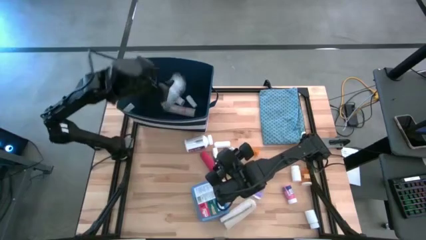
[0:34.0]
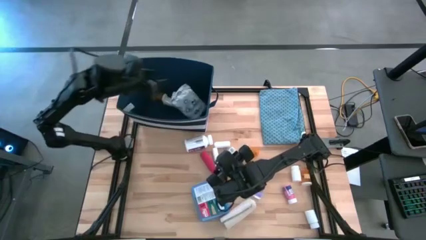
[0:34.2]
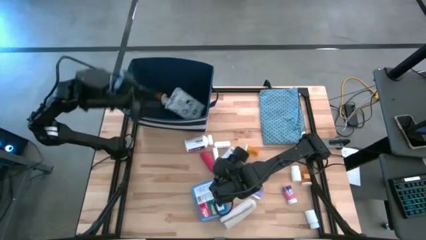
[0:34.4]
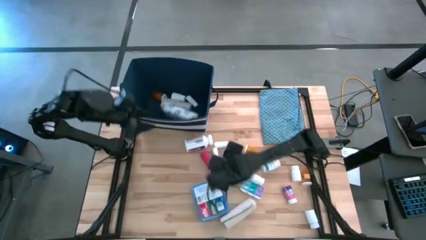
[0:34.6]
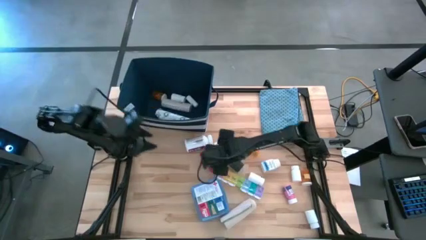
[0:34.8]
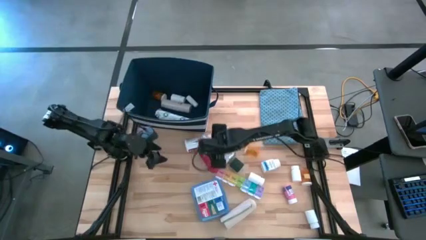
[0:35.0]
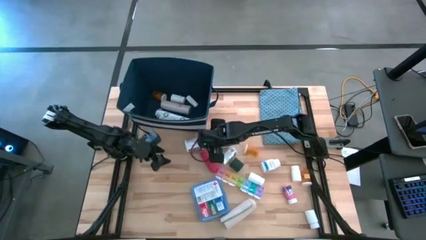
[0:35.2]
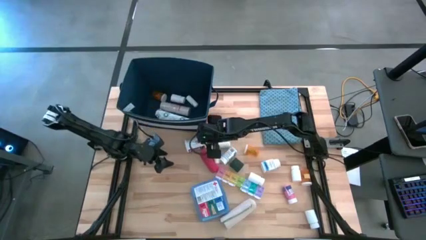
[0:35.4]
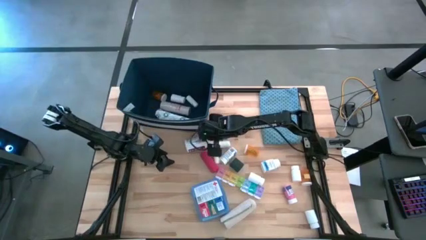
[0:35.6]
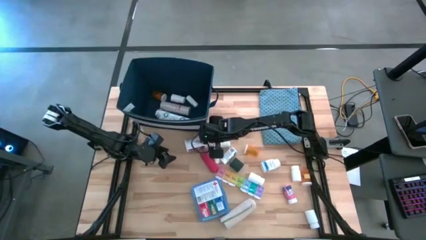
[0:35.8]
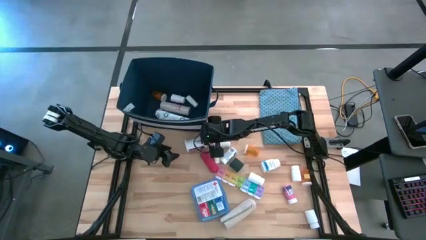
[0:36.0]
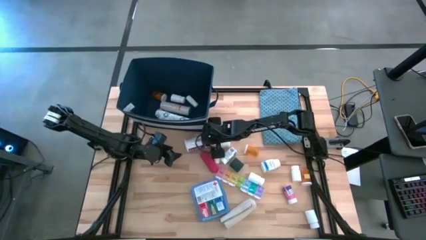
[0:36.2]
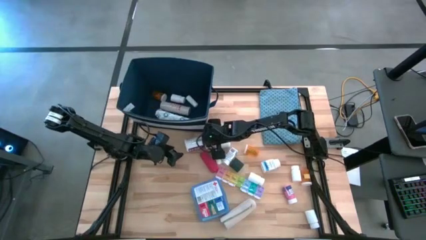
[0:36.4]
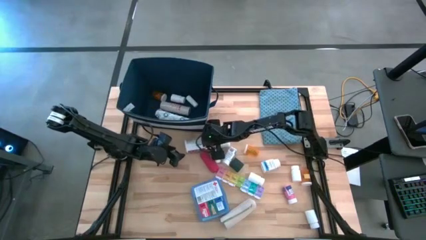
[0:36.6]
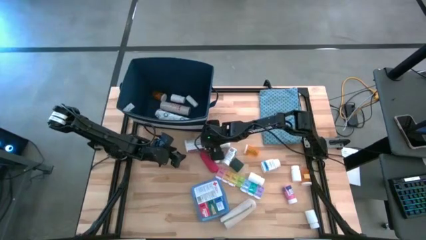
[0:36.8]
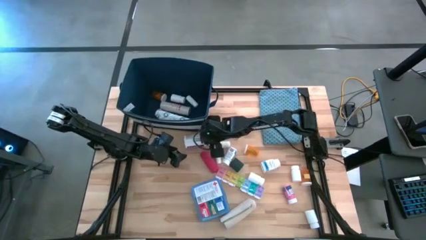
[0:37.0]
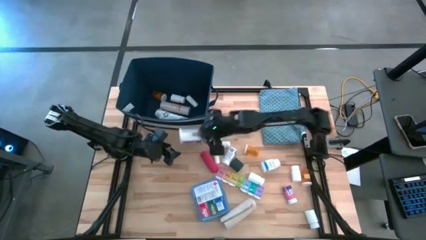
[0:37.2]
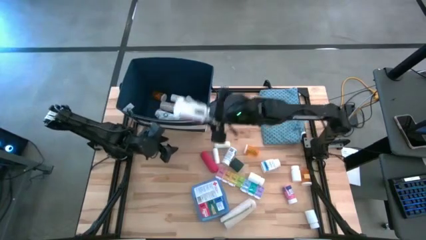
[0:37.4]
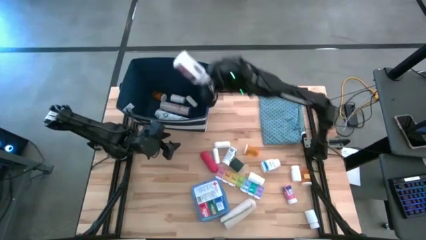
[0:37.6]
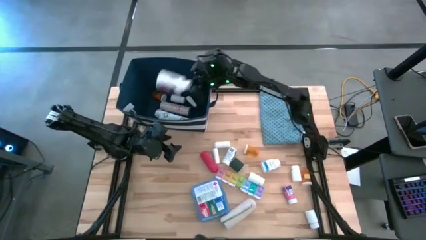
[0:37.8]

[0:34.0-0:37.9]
Task: Pick & place medical supplies in basket/bin
Put the violet medicine bottle into the blue bin

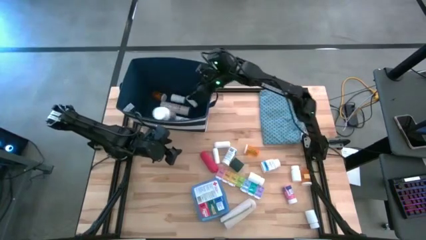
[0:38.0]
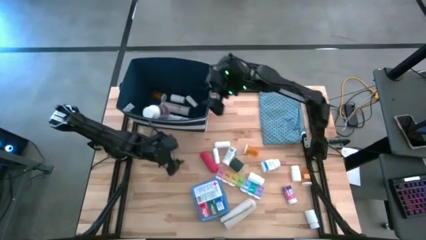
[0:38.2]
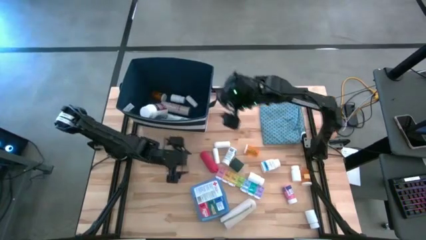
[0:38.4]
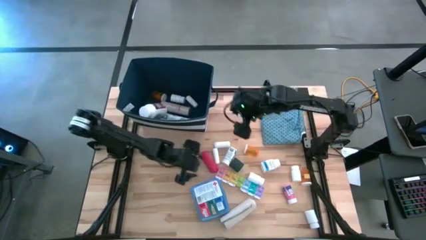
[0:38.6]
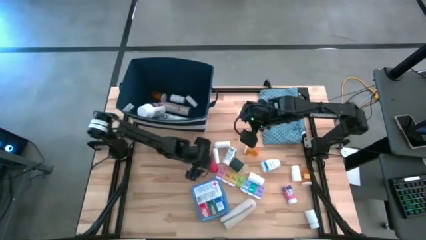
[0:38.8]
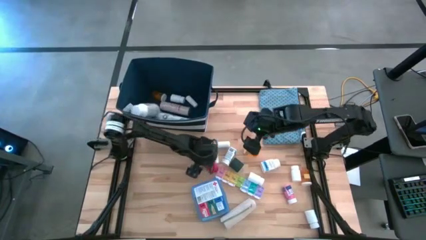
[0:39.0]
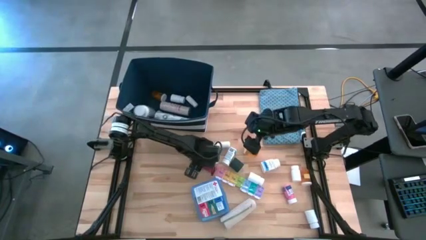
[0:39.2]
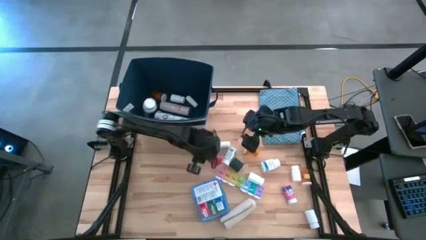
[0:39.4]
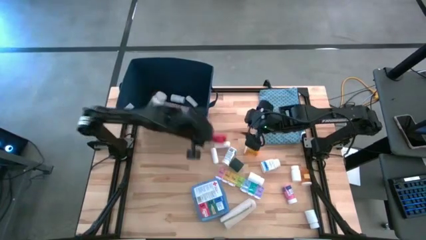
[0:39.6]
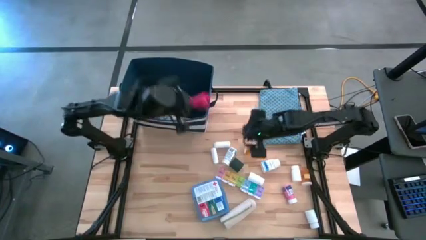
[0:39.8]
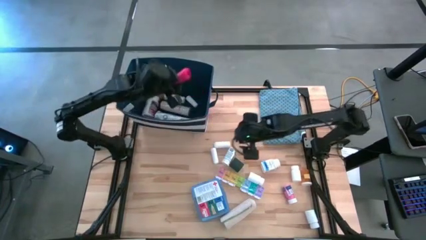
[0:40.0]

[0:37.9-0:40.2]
Put the red bandage into the blue bin

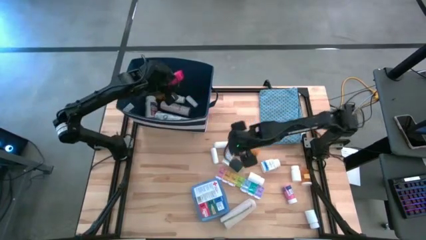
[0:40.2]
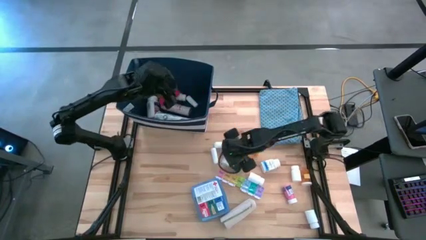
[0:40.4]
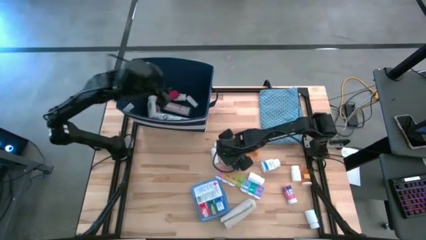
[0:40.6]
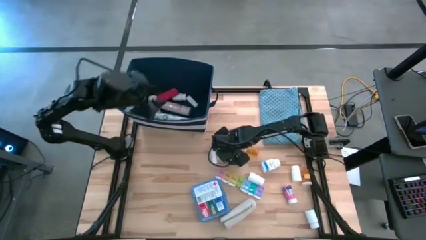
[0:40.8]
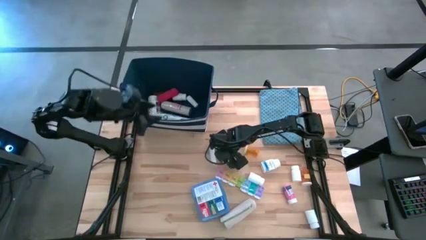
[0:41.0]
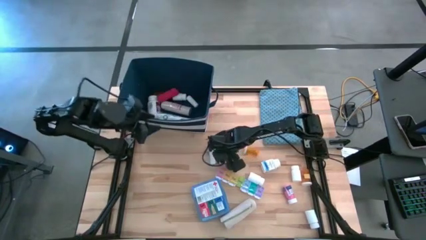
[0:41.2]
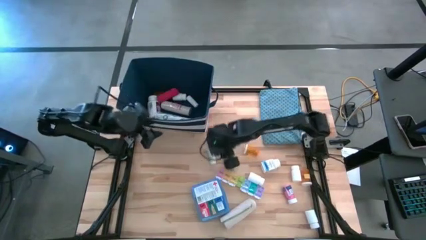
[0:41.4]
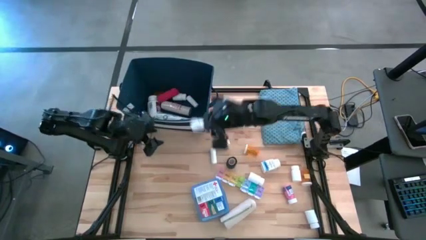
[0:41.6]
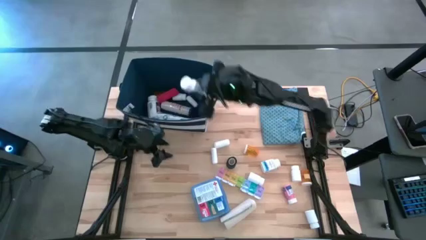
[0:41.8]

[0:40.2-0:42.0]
Put the left blue supplement bottle into the blue bin

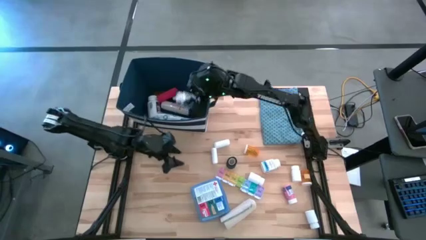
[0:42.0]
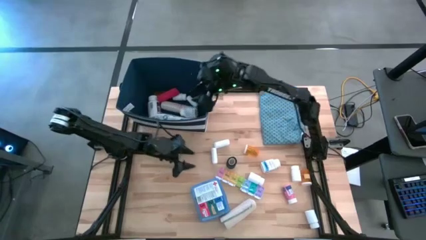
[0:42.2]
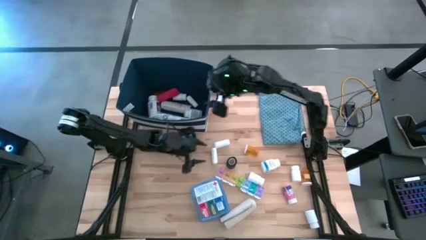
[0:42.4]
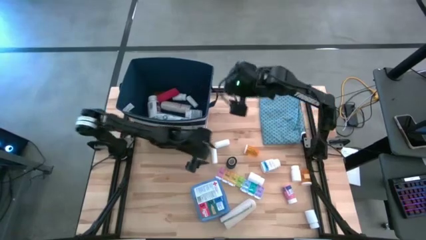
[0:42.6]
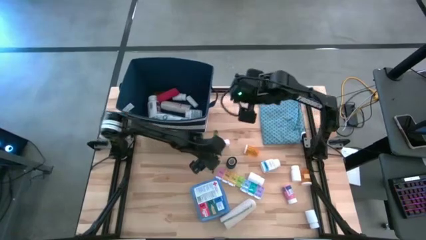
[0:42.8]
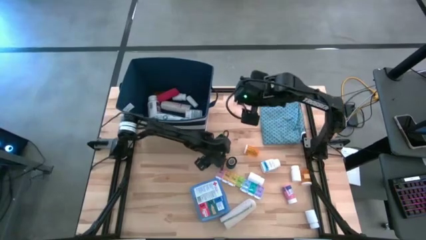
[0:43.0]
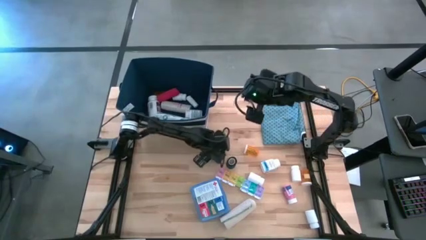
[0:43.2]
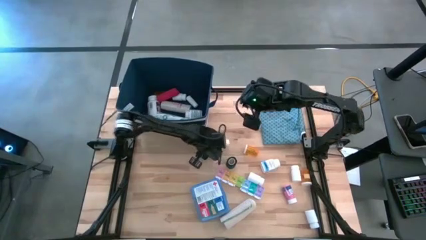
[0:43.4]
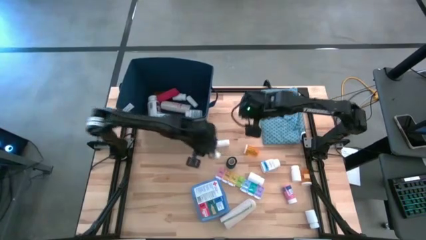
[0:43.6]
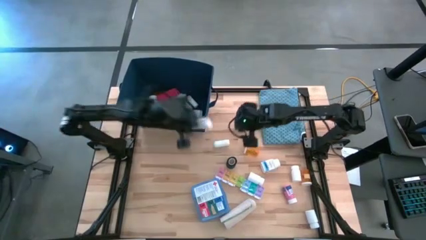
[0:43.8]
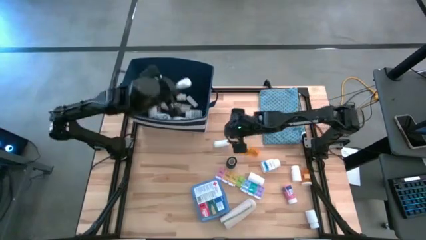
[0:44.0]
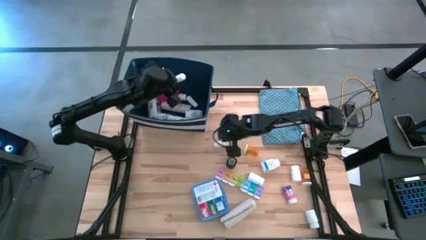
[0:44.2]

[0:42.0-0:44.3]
Put the bottom rolled gauze into the blue bin

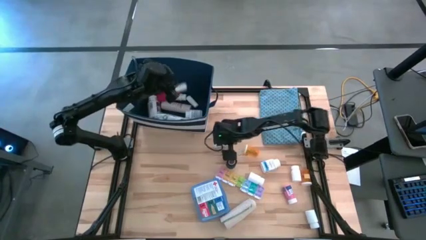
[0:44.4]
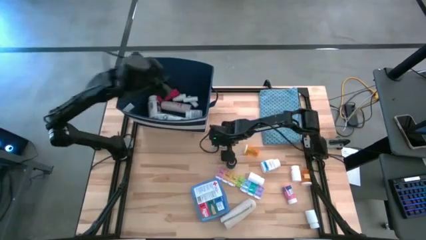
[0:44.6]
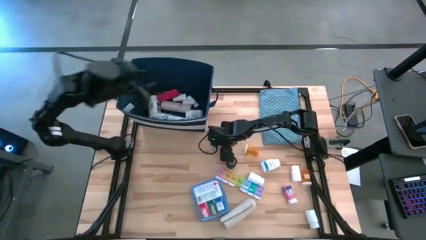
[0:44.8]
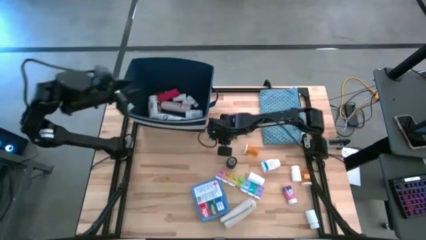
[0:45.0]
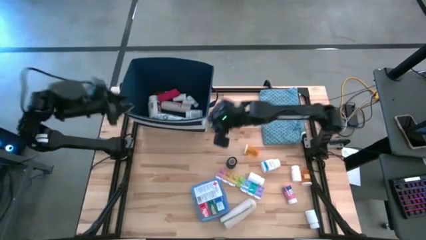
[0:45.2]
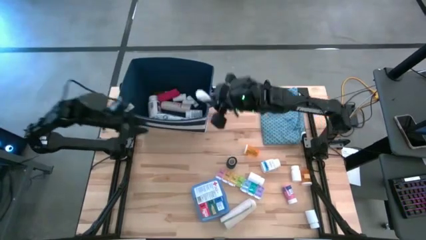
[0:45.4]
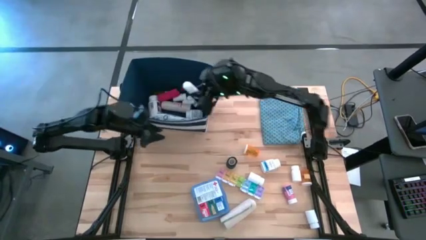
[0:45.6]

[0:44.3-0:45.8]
Put the rolled gauze into the blue bin

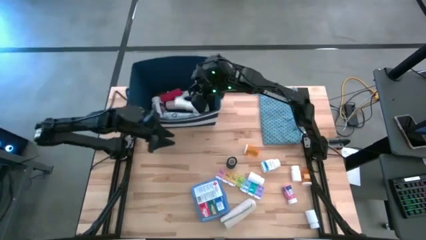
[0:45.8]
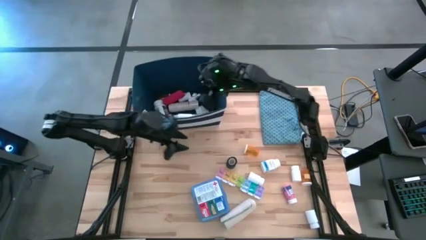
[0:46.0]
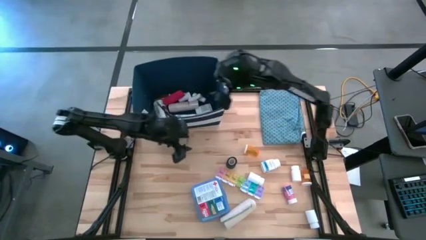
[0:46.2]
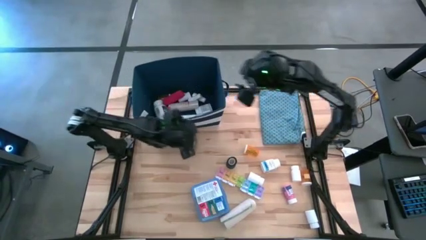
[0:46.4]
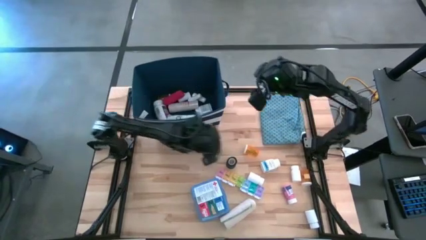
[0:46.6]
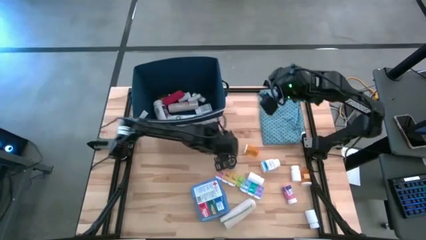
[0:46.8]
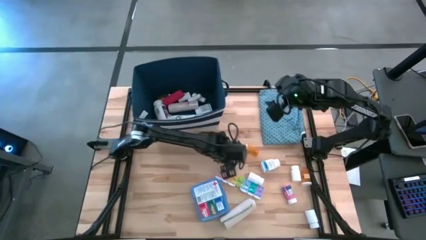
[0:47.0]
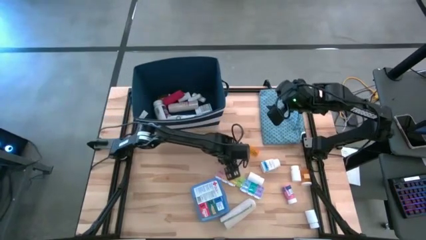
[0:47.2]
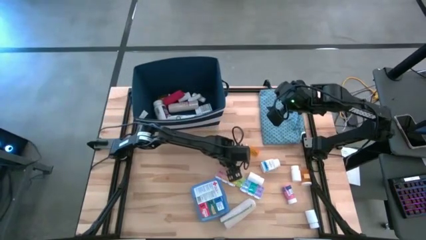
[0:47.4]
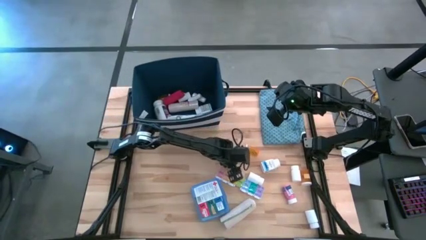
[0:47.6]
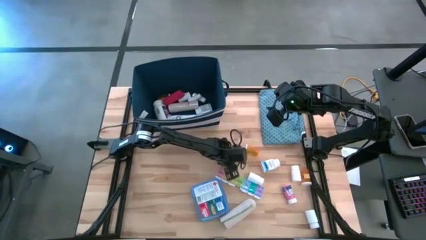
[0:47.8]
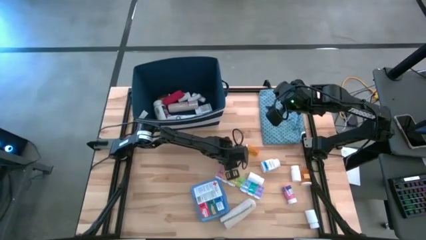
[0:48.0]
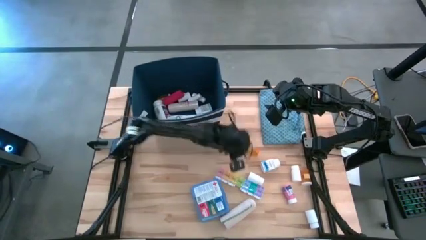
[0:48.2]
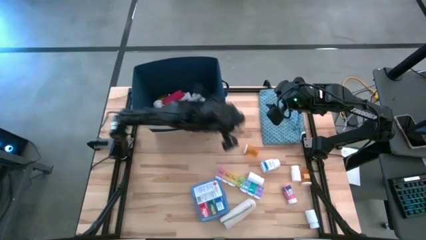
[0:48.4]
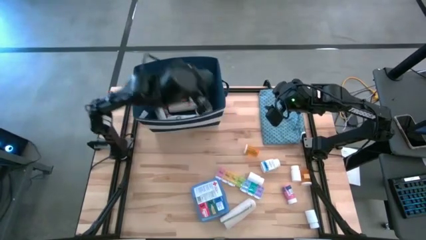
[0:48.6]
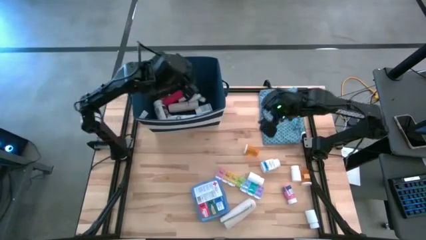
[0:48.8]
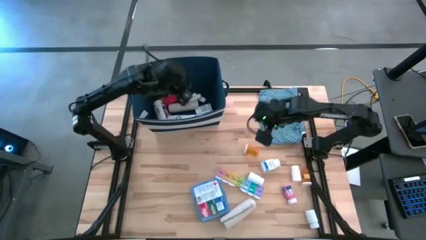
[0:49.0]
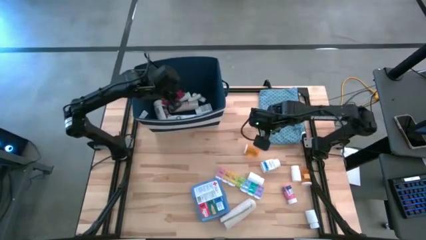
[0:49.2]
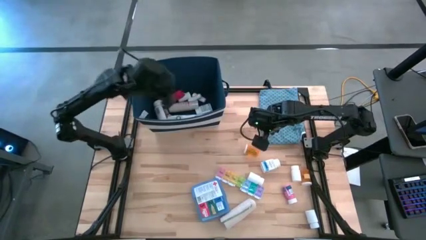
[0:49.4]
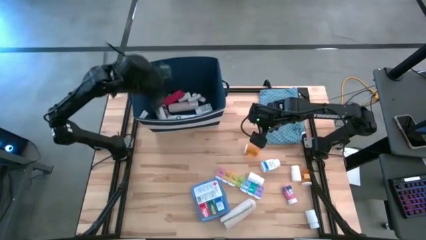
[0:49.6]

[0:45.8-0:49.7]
Put the black bandage into the blue bin

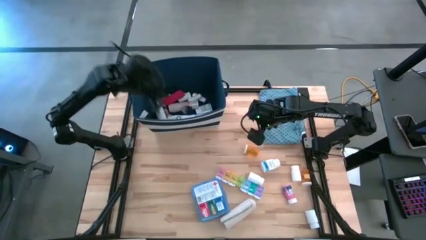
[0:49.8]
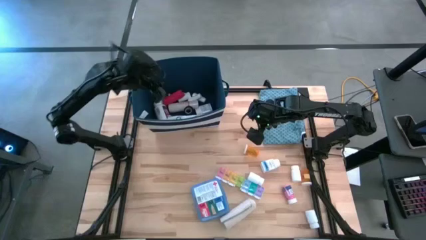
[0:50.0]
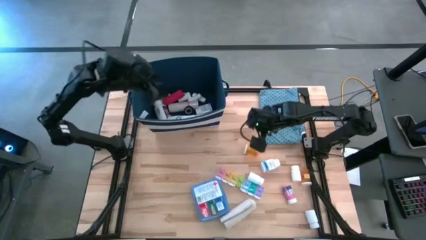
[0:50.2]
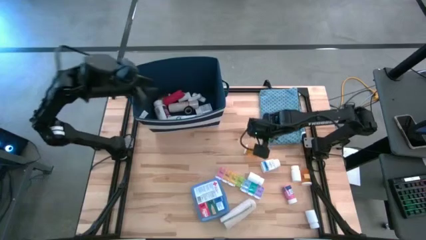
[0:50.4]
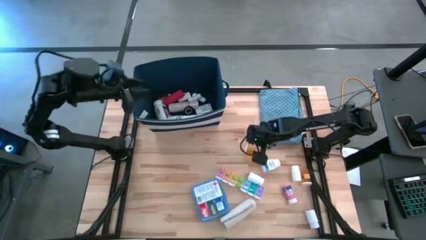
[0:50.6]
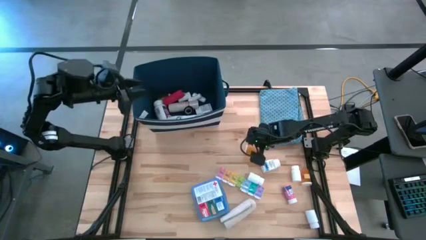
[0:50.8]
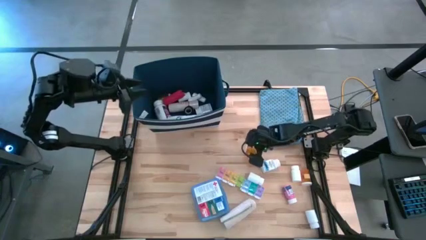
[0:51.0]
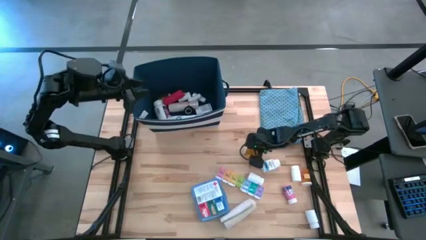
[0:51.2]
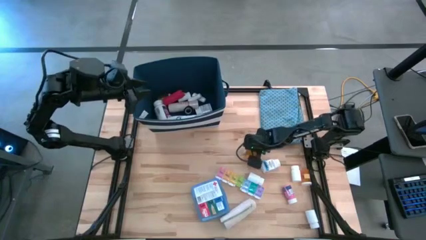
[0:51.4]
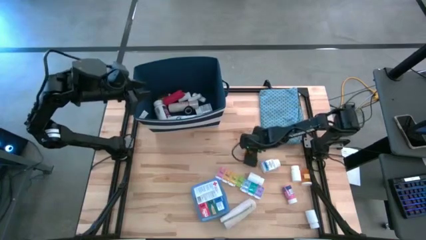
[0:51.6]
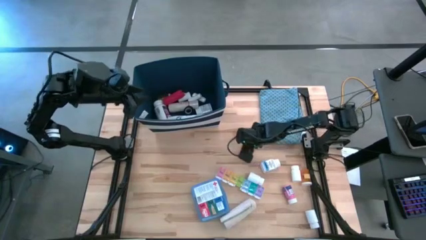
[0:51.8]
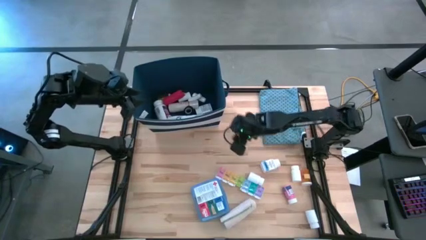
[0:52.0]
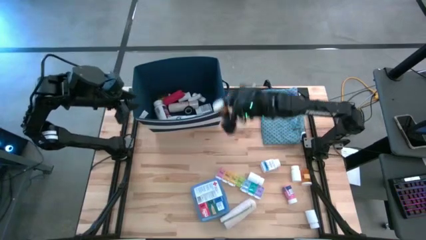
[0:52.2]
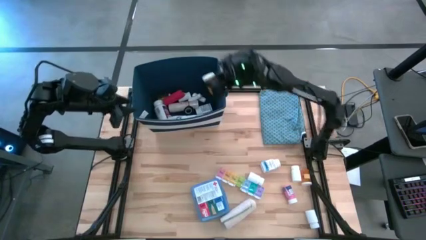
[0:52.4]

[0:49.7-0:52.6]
Put the top orange medicine bottle into the blue bin
